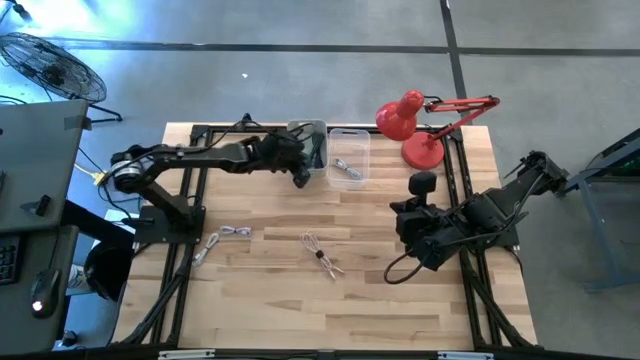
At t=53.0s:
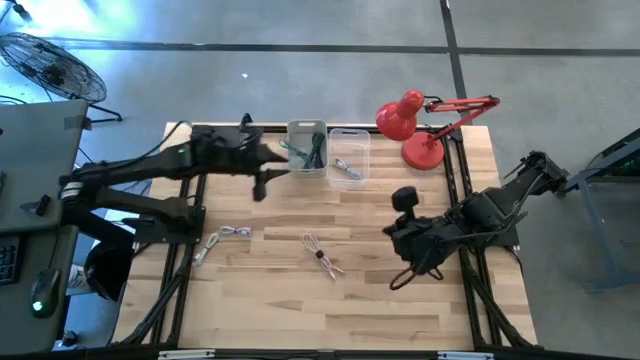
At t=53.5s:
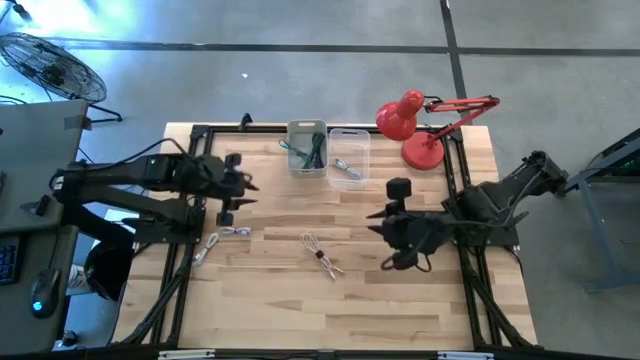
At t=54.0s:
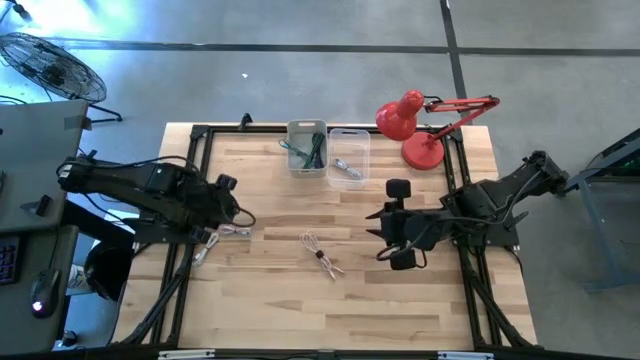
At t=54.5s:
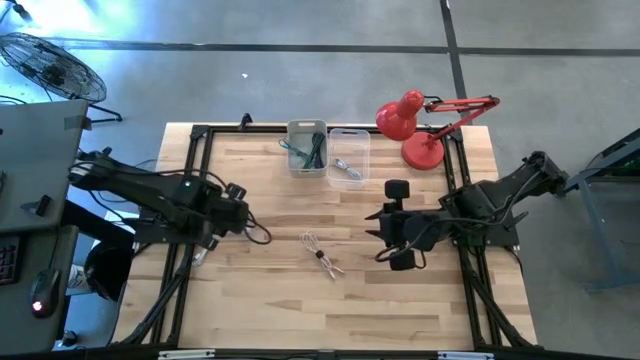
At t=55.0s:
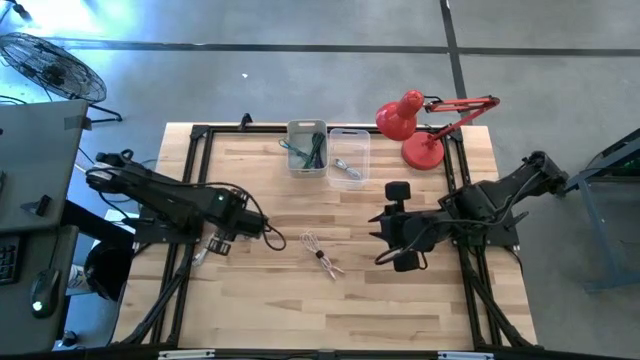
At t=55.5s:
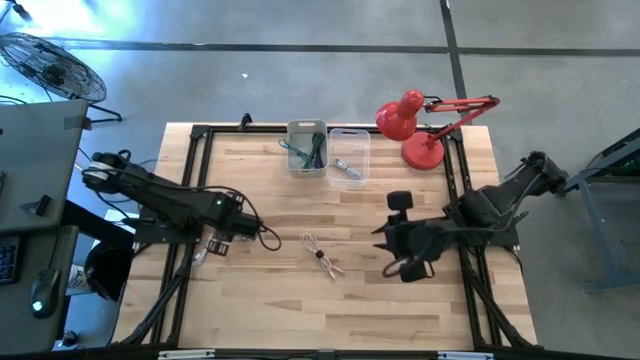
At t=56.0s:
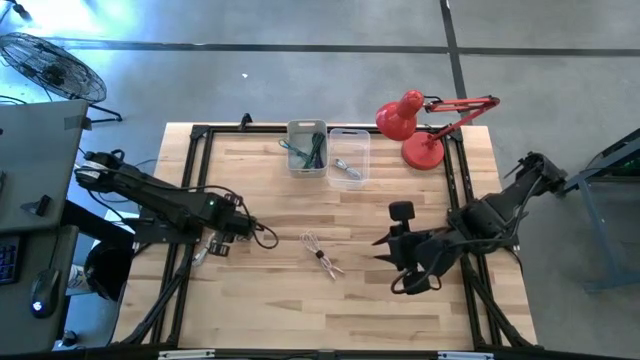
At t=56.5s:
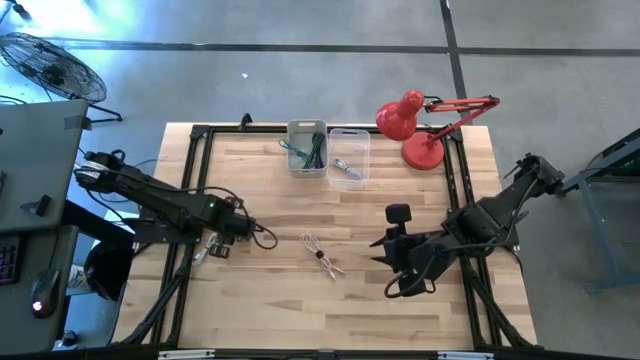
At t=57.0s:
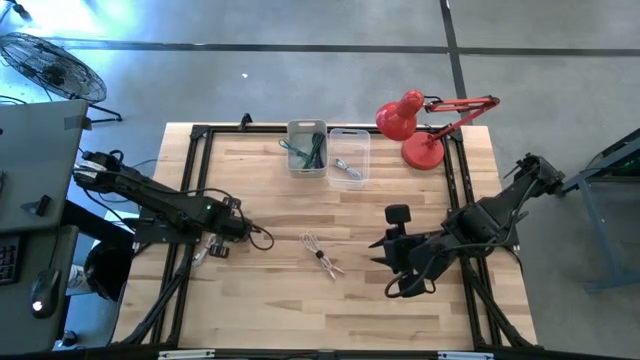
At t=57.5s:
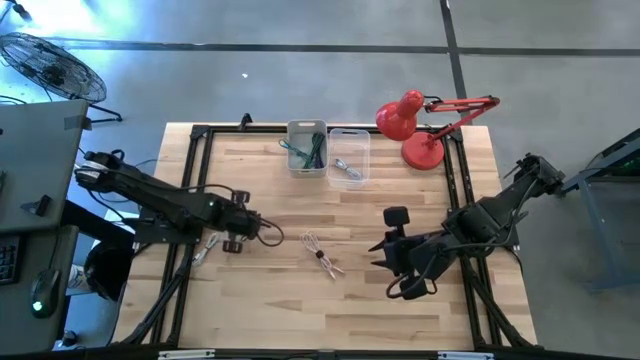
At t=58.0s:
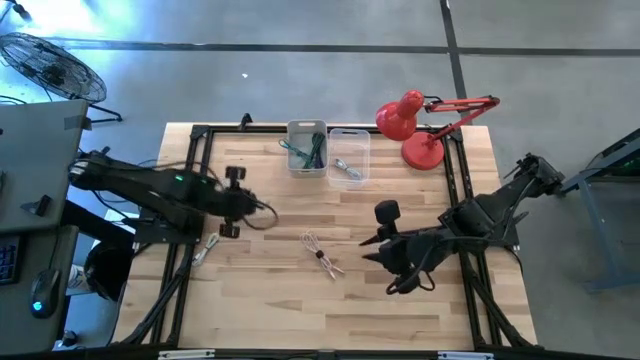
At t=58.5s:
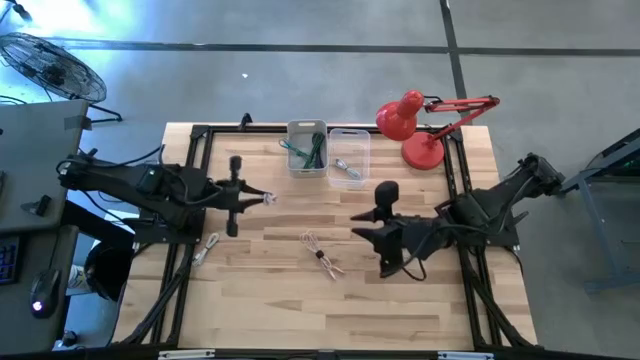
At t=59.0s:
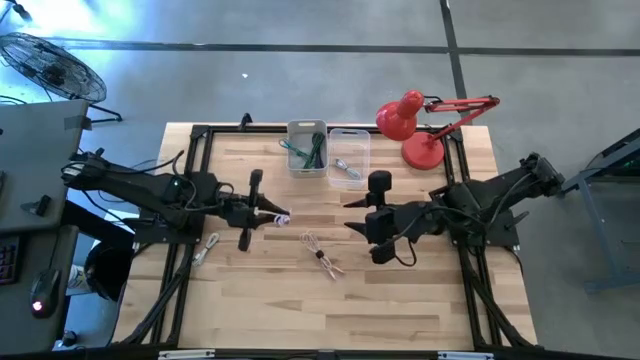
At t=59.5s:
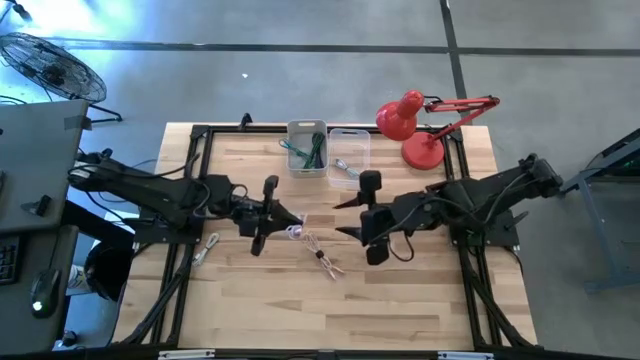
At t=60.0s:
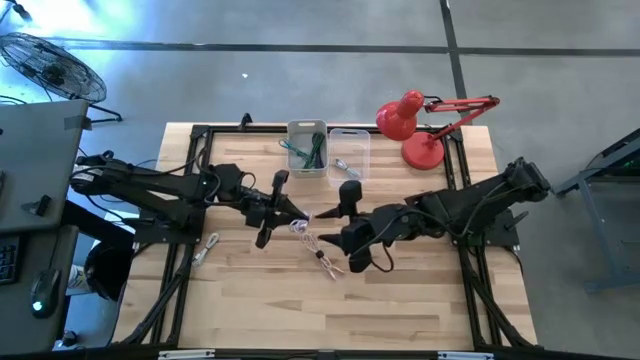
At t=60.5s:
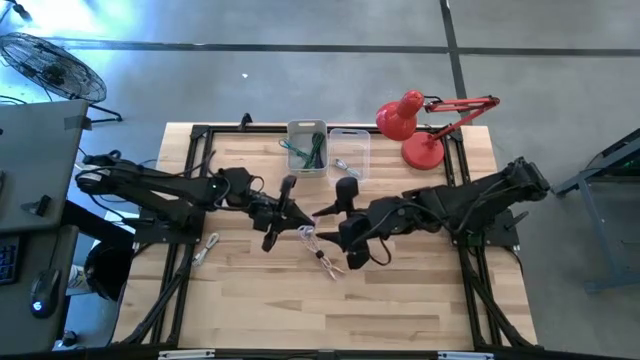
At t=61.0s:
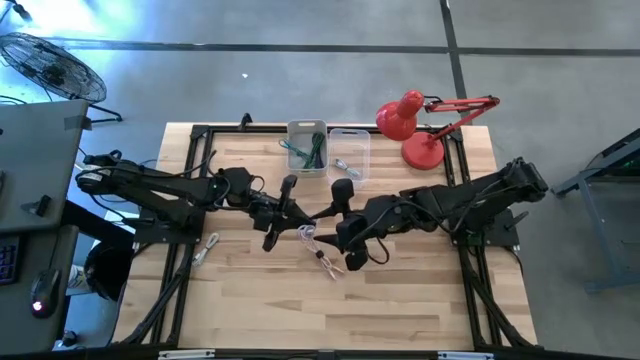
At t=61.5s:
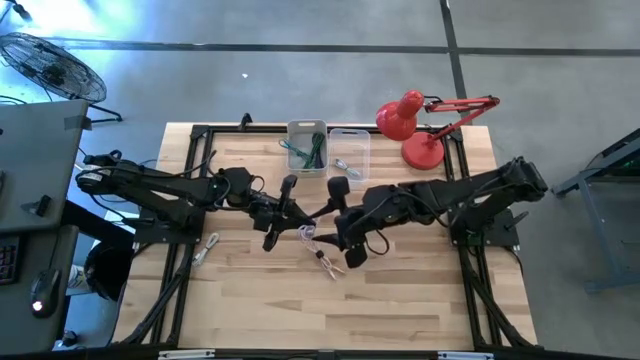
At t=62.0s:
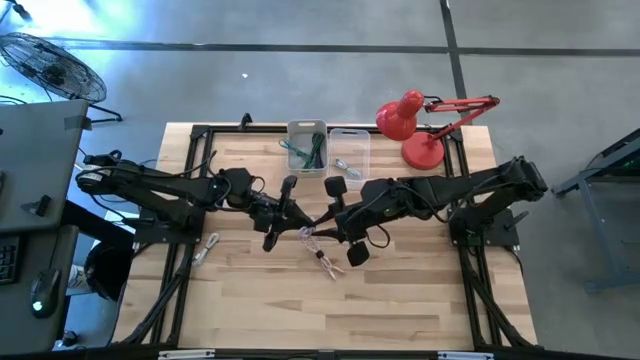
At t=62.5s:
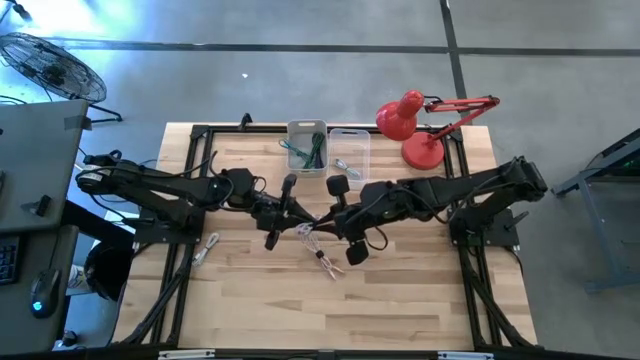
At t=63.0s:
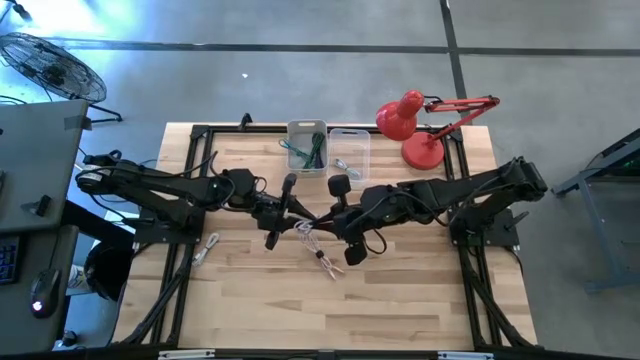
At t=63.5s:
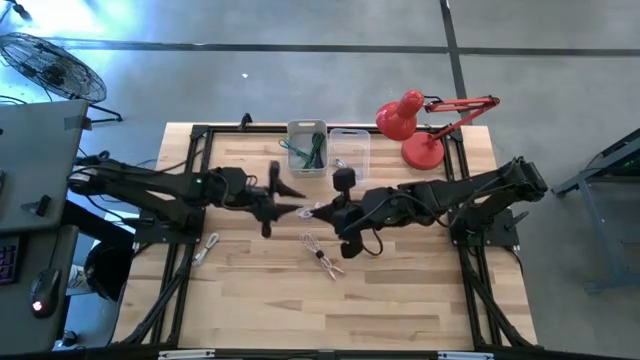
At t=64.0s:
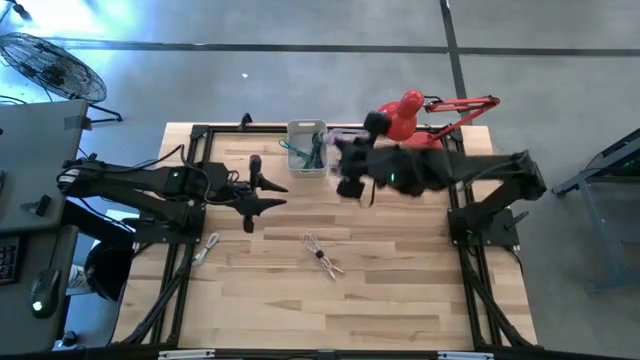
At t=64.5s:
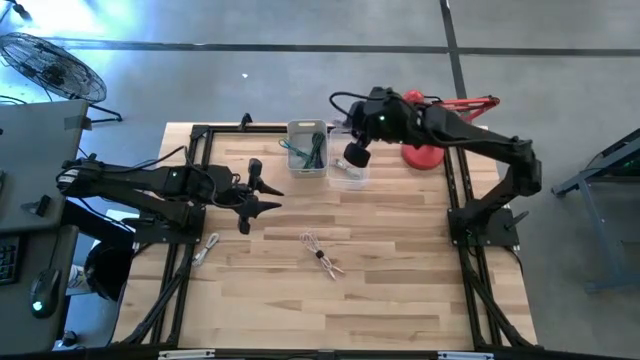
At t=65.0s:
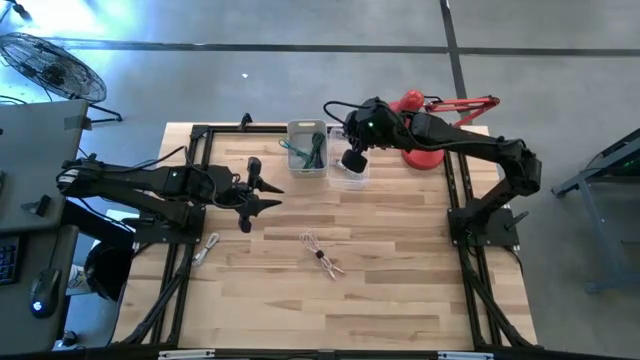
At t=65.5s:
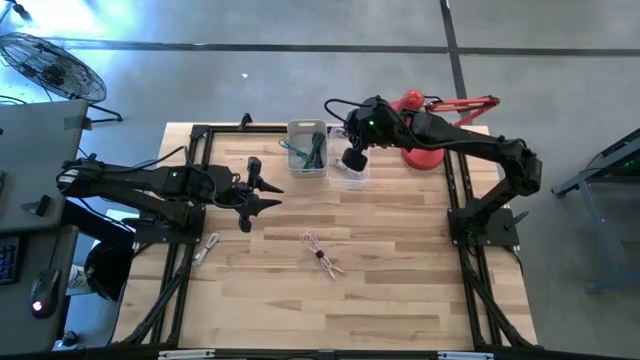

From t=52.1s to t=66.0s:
Task: Pick & Place USB Port
Put the purple charger cable into the transparent bin

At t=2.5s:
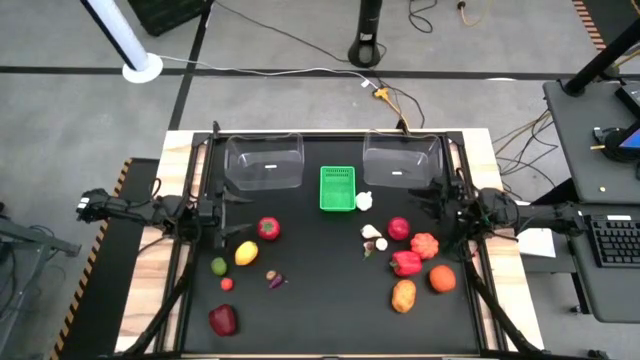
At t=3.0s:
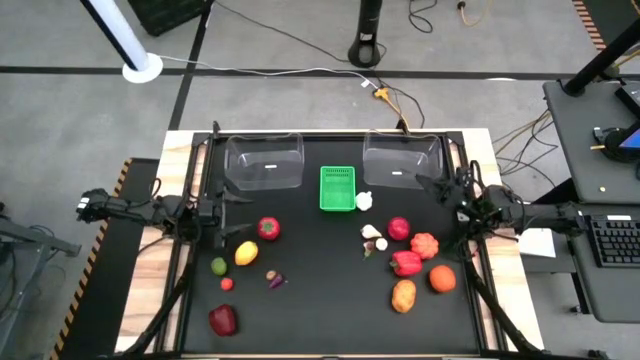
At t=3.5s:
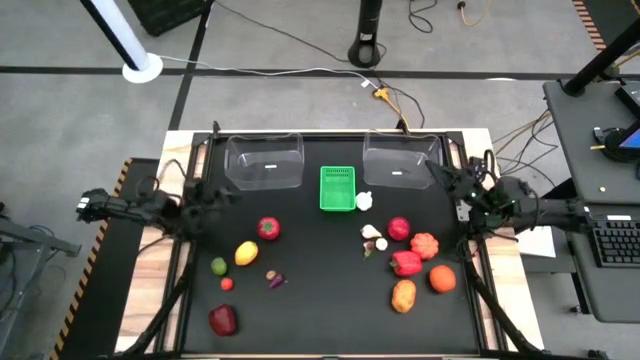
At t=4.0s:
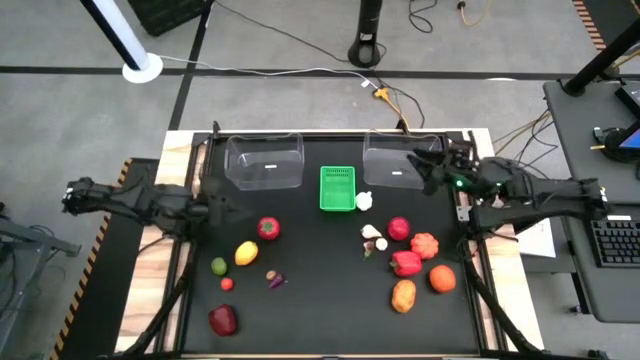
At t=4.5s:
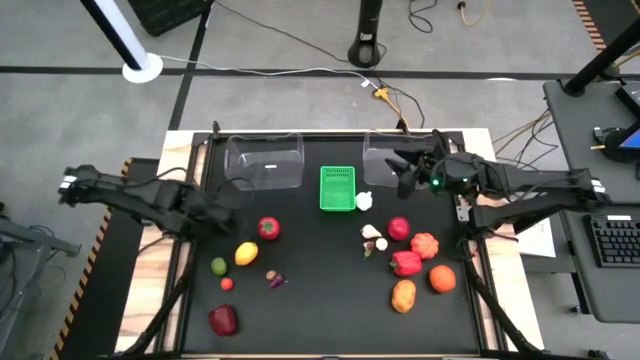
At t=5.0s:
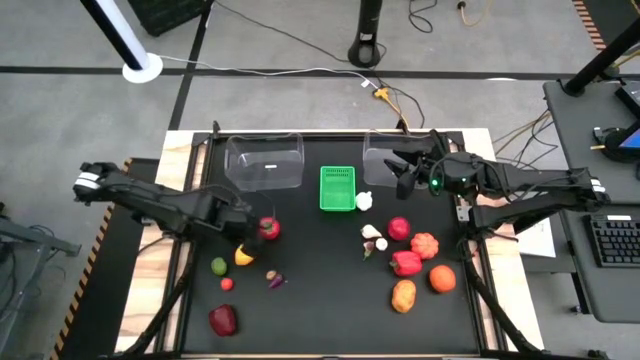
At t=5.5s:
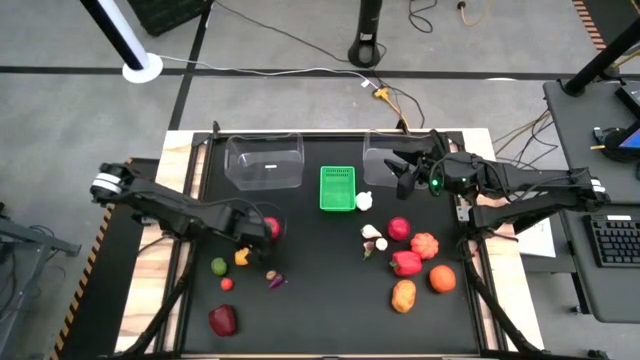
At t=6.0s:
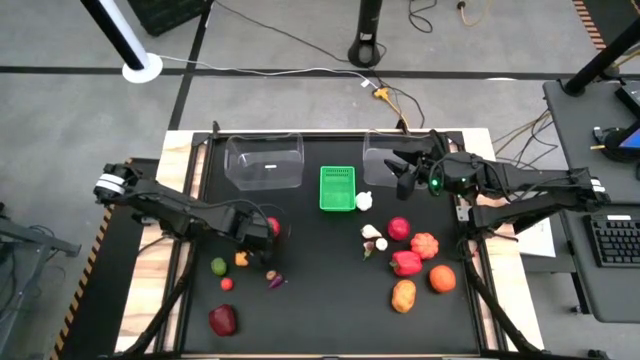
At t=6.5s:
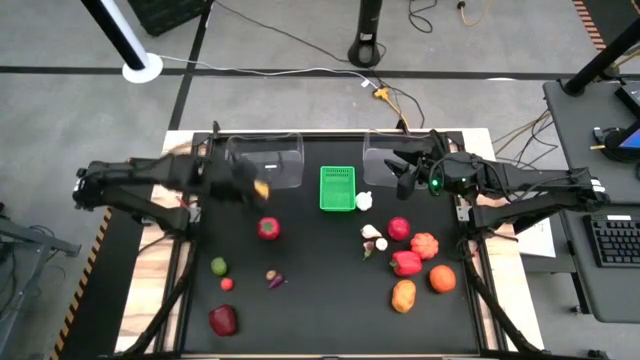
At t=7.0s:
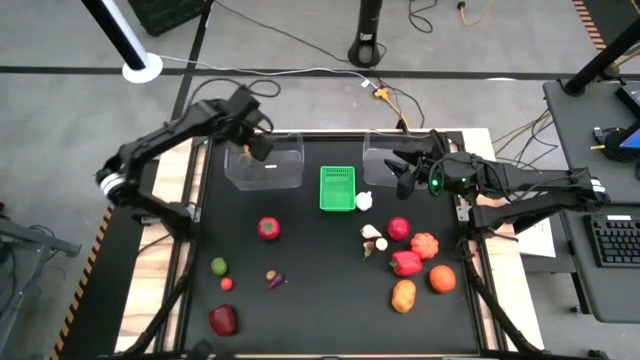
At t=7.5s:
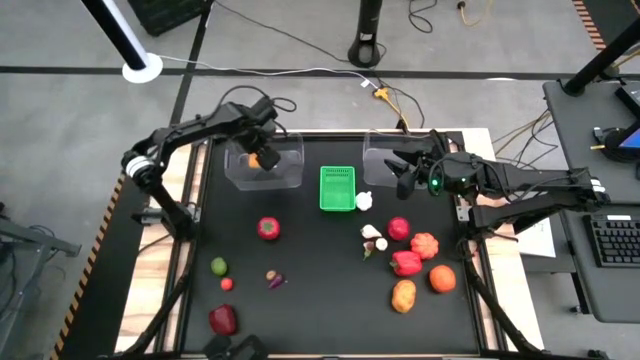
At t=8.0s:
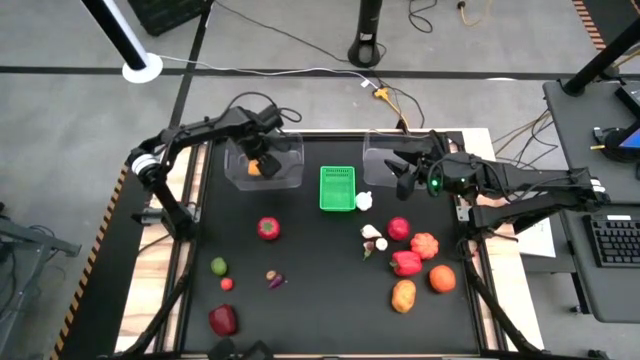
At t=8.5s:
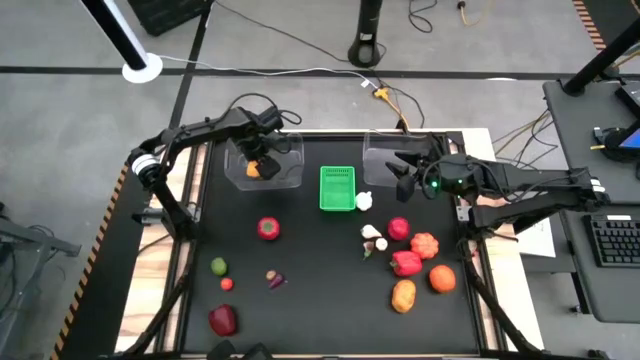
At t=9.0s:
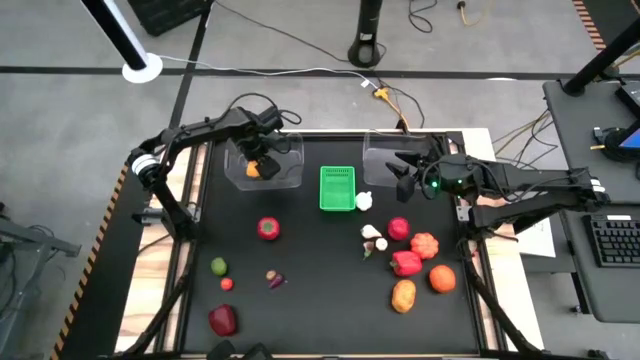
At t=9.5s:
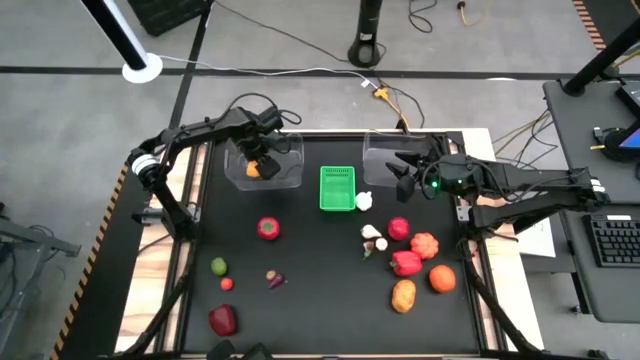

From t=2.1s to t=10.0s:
Task: Sort produce into baskets
Put the yellow lemon into the left transparent bin
